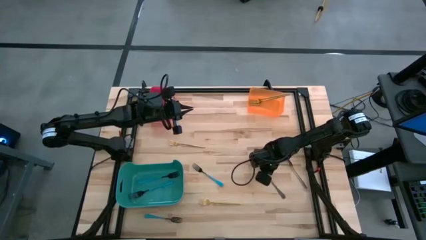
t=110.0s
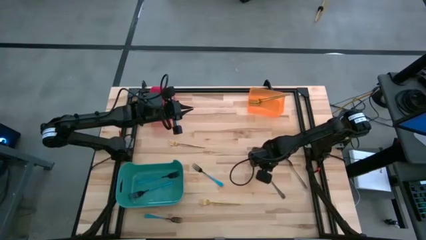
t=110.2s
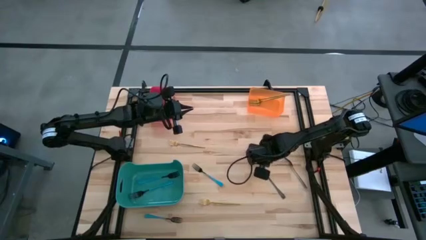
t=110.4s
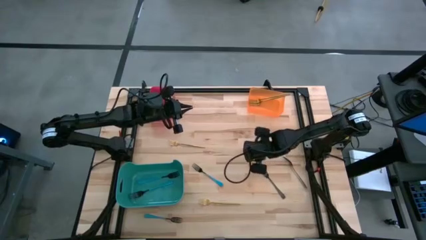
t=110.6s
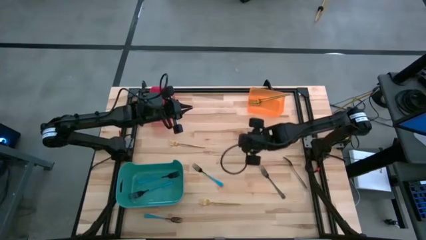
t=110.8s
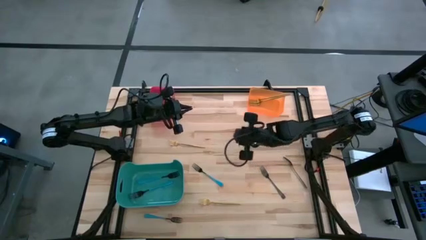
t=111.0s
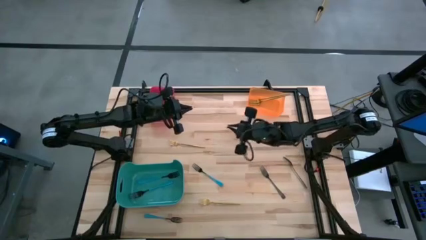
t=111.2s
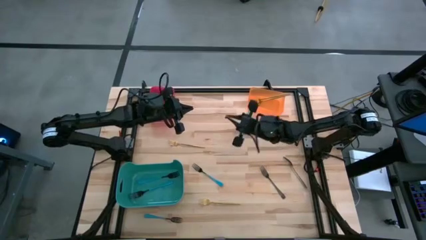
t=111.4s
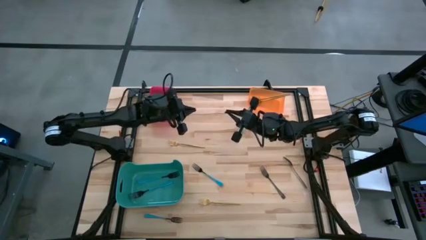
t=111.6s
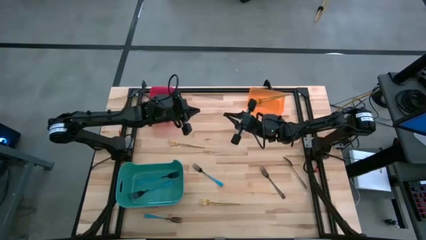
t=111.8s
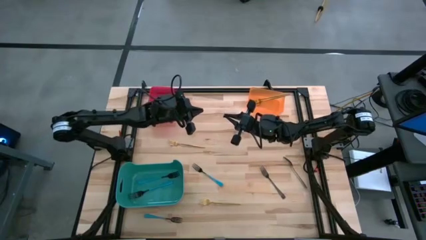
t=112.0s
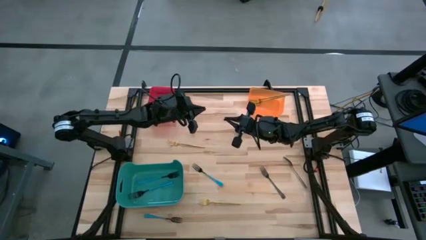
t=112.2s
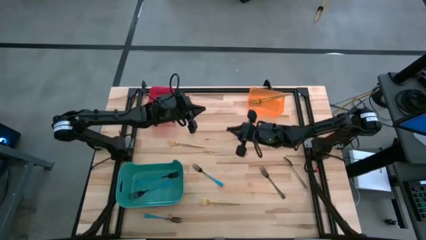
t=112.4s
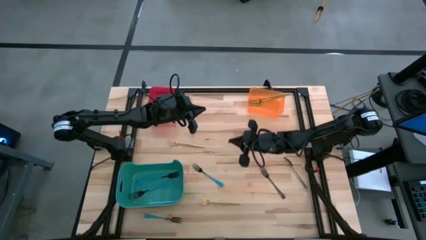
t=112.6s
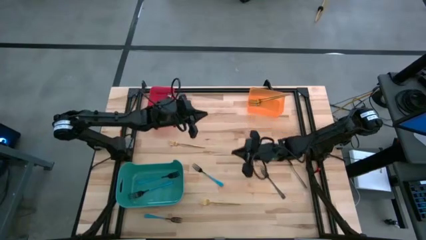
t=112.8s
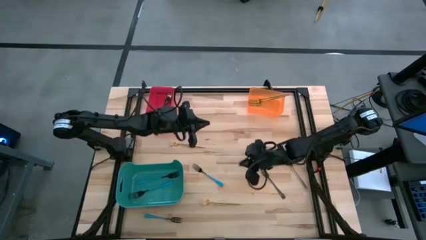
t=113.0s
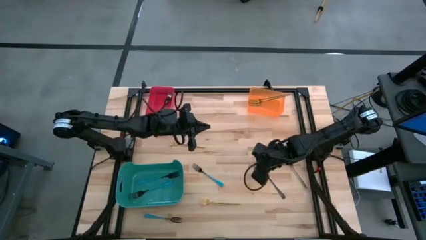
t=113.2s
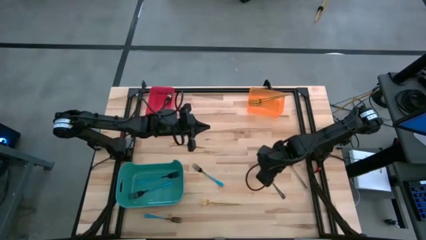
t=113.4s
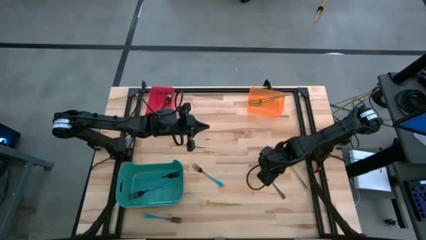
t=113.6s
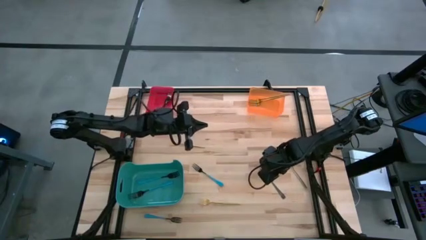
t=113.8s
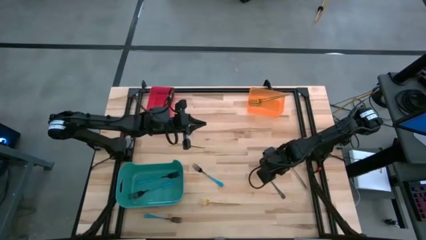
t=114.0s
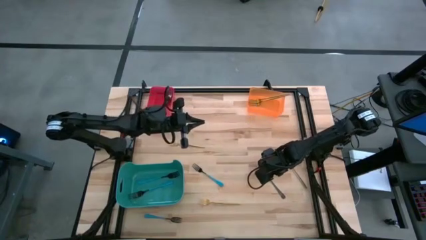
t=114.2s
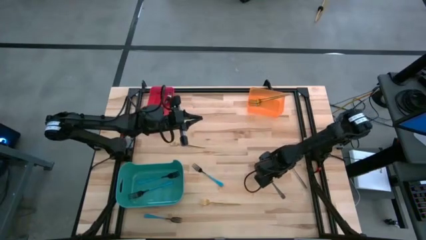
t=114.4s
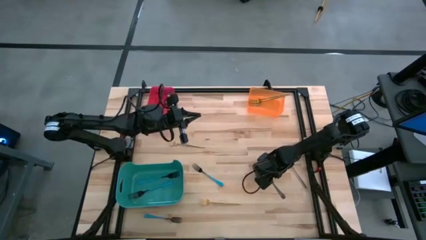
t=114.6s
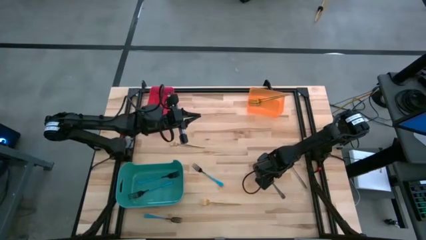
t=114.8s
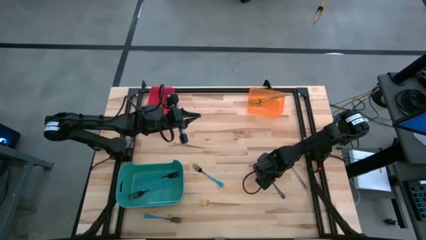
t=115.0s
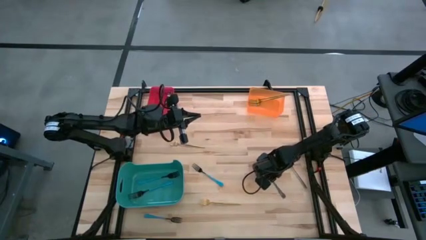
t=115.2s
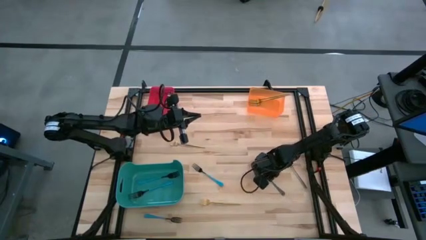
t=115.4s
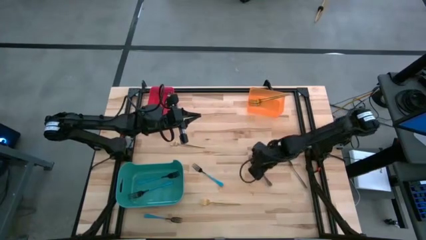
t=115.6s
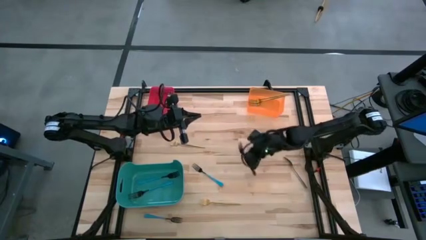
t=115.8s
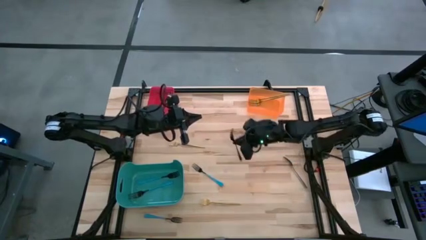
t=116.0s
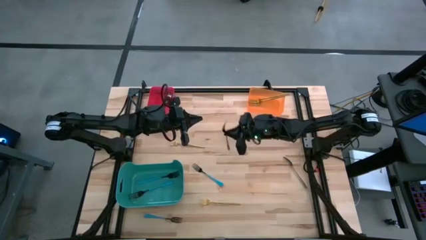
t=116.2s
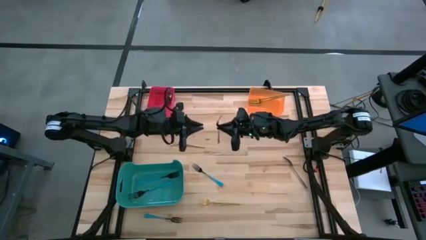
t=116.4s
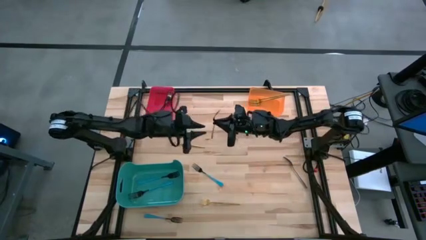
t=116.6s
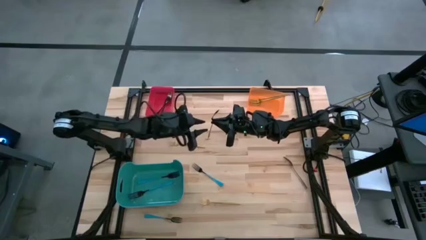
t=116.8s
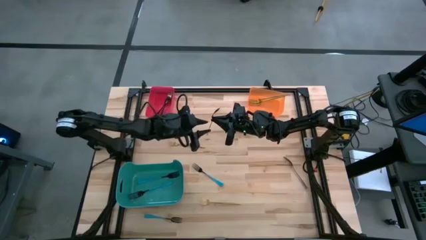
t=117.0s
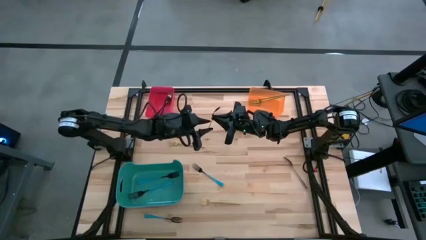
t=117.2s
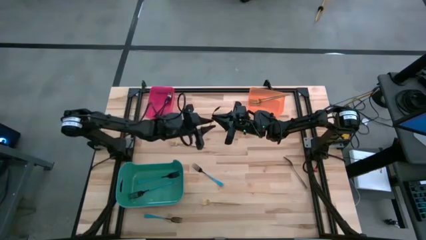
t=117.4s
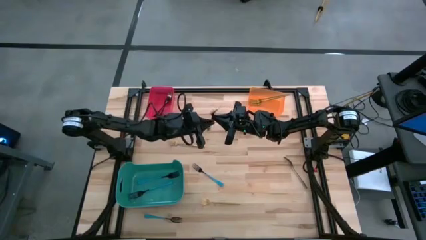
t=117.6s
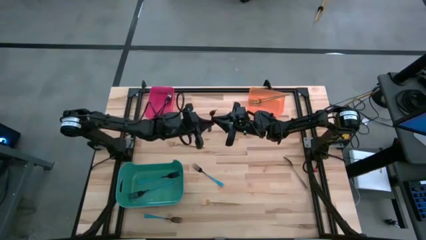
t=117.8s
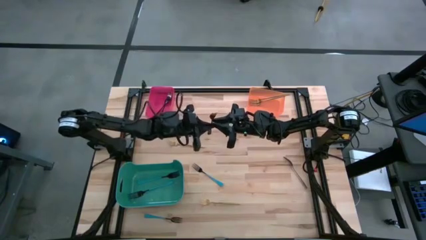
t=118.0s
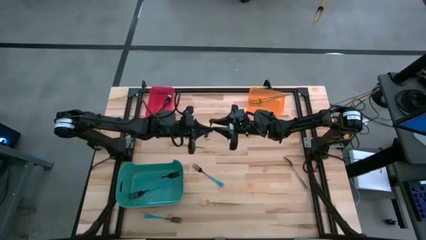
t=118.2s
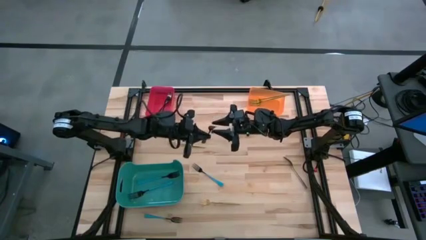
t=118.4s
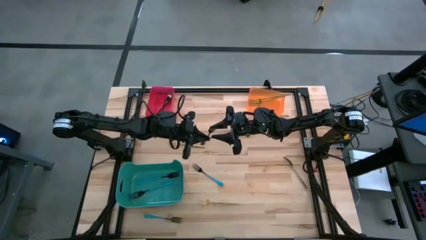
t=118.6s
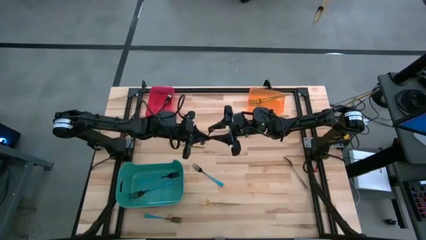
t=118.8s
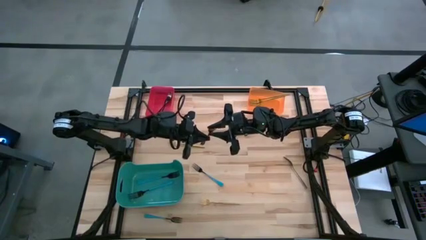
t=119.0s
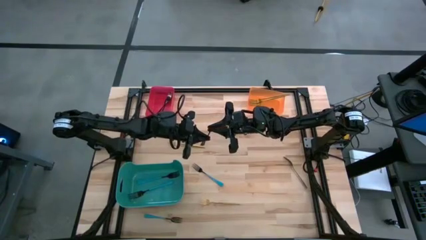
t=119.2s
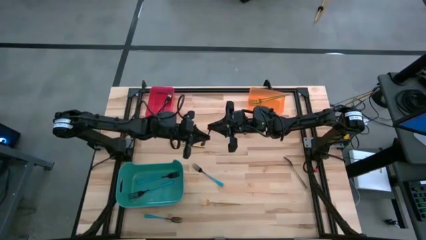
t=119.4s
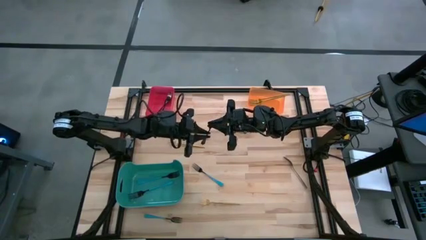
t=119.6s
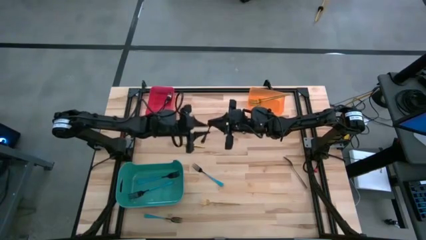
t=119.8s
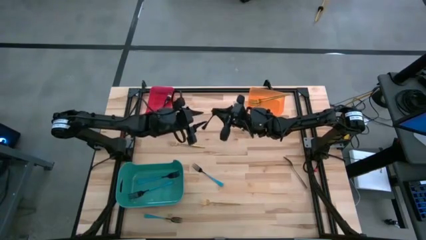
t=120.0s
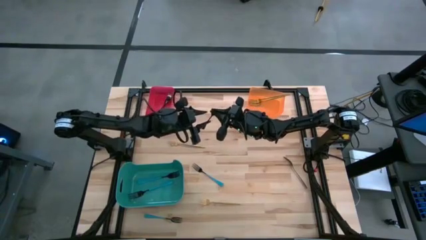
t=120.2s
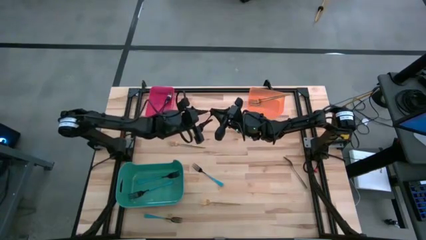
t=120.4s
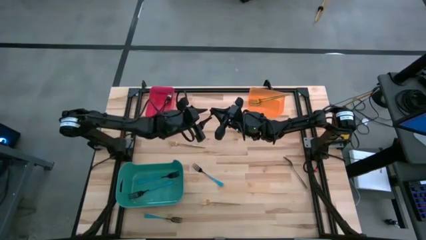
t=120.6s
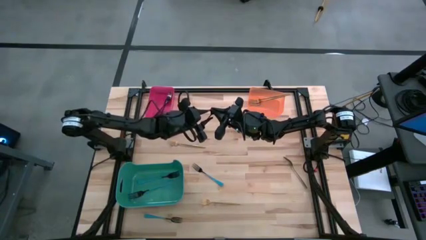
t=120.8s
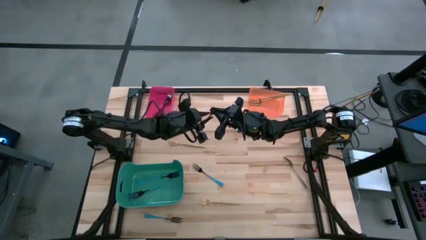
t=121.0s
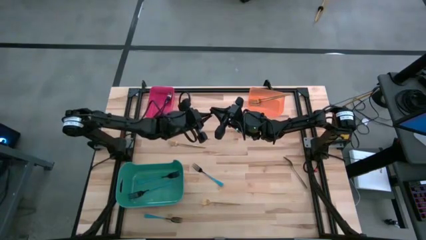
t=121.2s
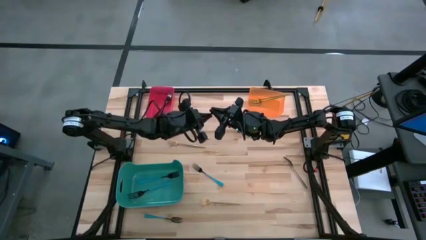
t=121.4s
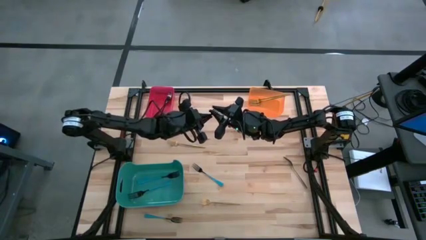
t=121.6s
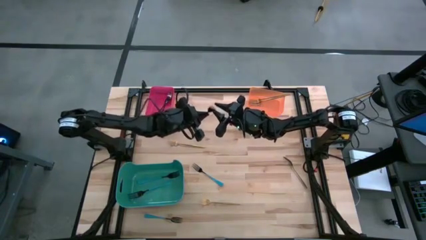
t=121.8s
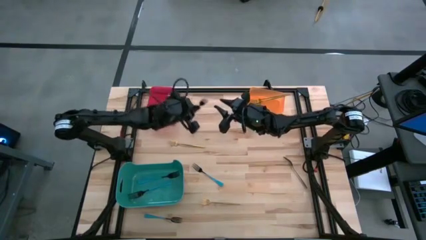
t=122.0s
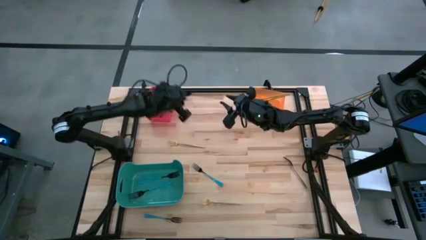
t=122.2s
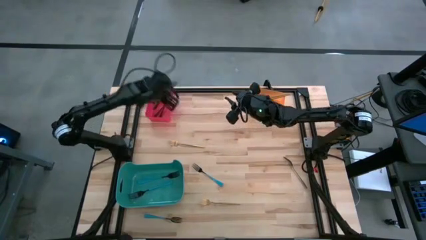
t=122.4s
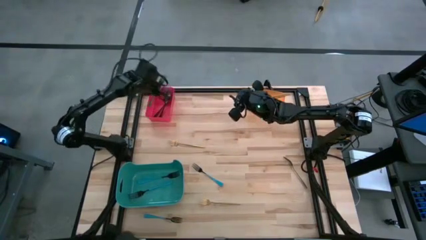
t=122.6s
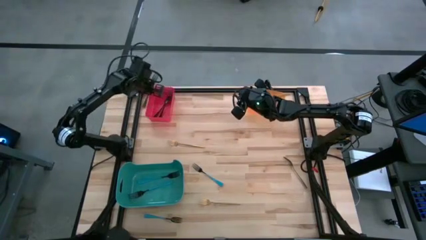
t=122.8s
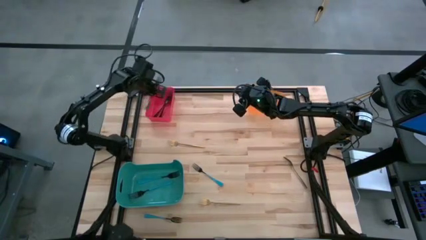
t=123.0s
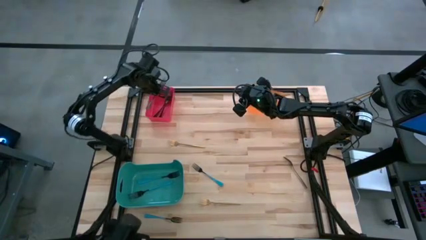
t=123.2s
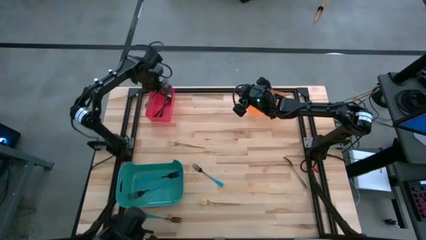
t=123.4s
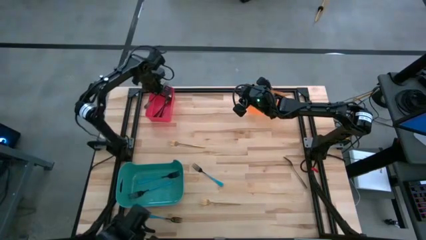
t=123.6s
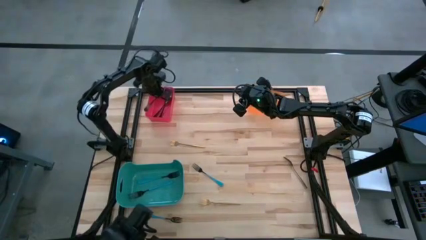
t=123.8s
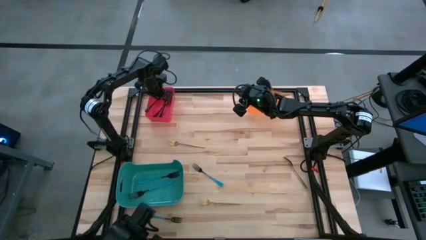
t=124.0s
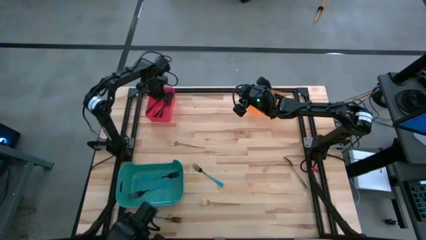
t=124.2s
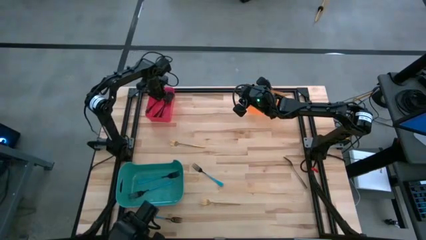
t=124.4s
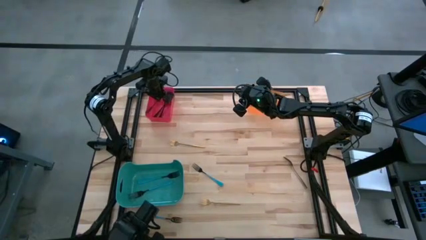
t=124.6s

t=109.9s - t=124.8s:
Task: Sort silverware by color (type)
Put the black fork into the red bin

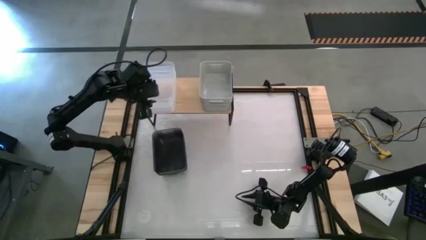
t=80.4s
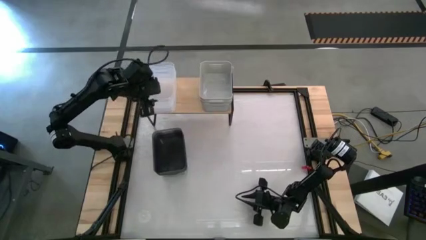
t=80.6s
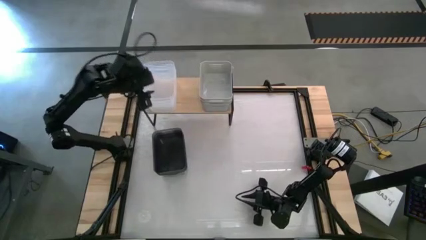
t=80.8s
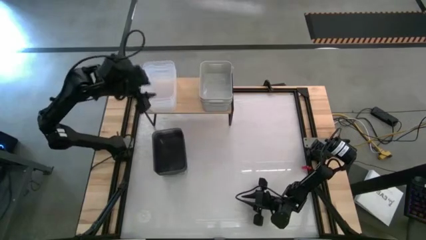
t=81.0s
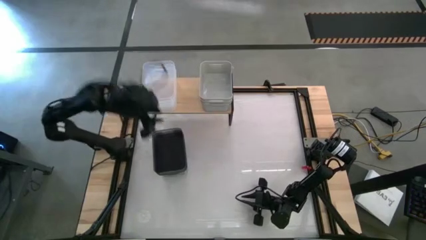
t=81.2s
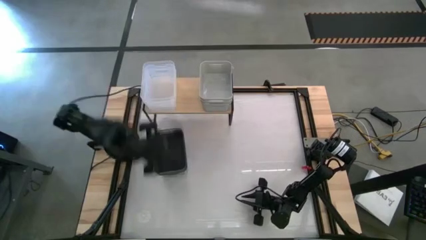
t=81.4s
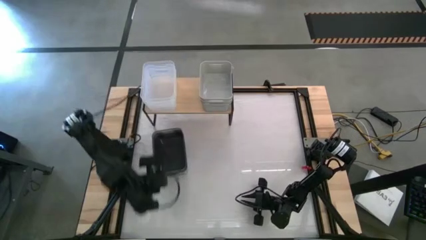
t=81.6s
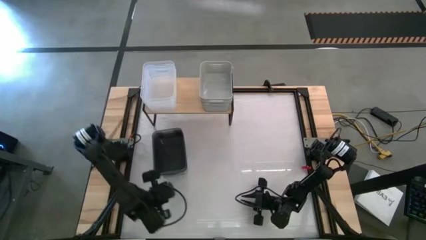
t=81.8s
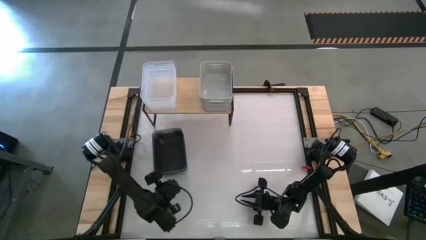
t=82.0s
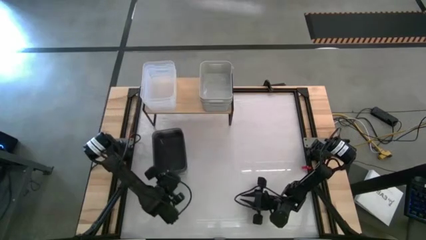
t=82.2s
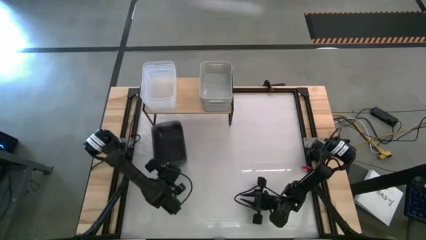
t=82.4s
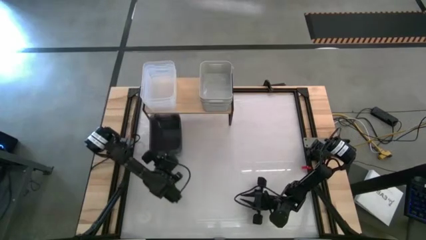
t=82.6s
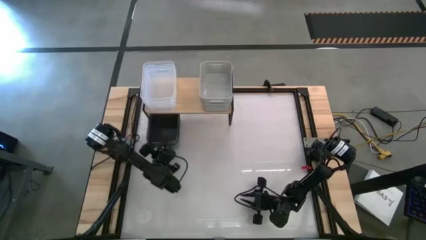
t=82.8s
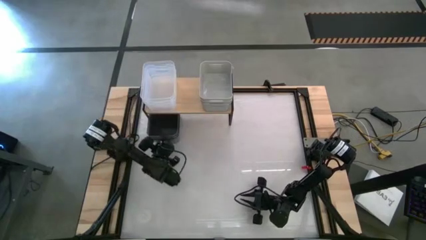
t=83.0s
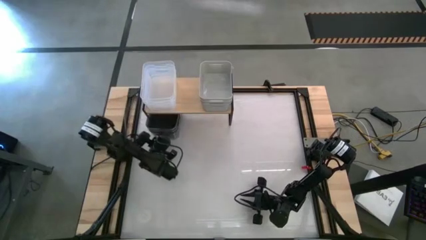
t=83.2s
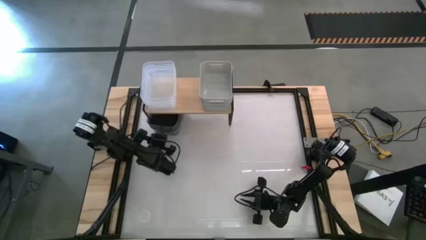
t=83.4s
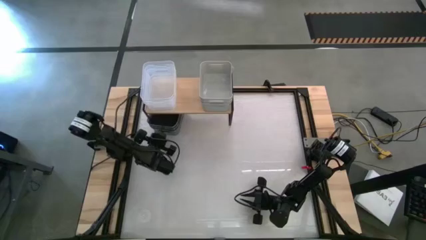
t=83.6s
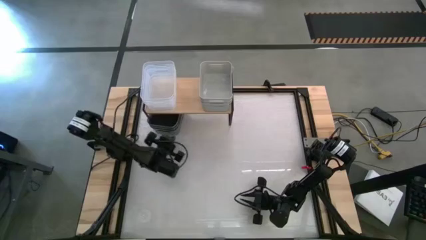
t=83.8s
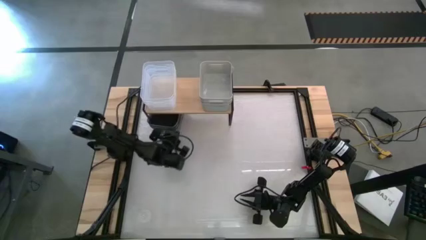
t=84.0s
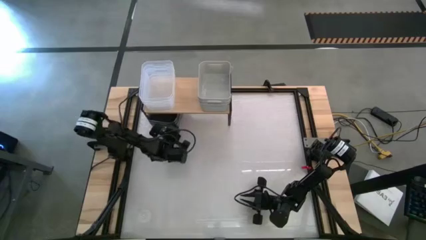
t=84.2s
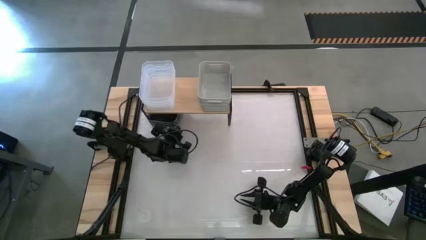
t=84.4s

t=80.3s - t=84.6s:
Task: Stack baskets on shelf by color
Put the stacked black bins under the shelf
